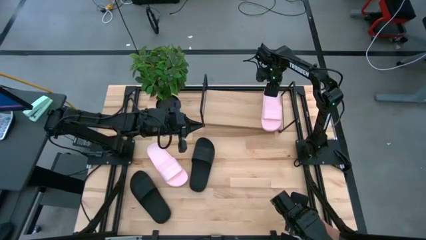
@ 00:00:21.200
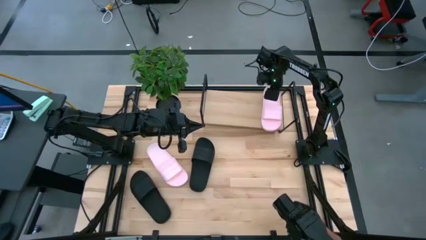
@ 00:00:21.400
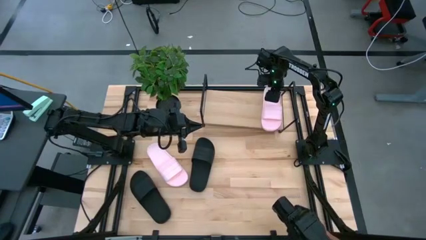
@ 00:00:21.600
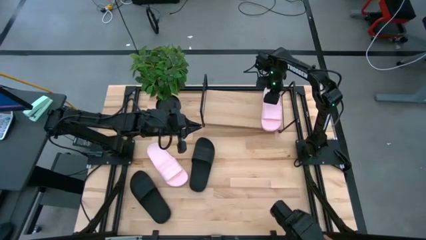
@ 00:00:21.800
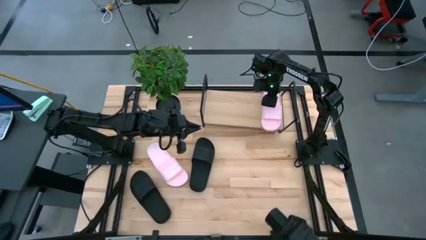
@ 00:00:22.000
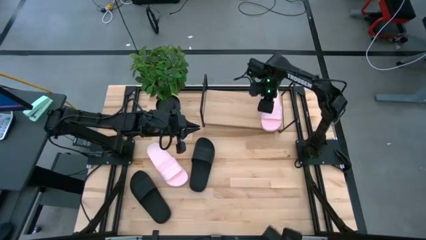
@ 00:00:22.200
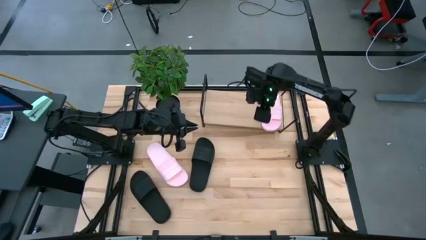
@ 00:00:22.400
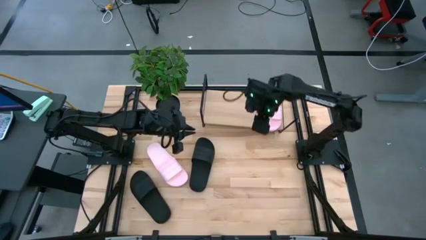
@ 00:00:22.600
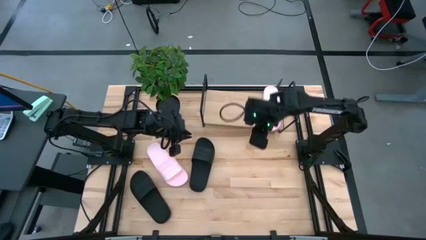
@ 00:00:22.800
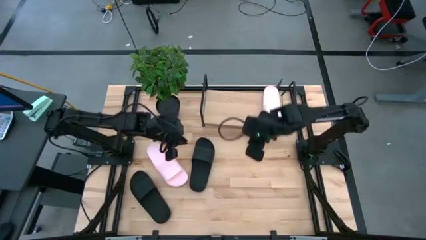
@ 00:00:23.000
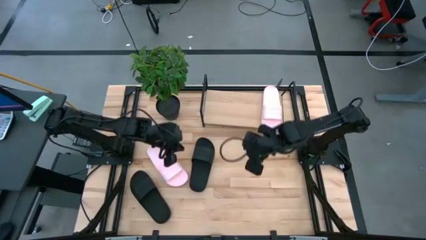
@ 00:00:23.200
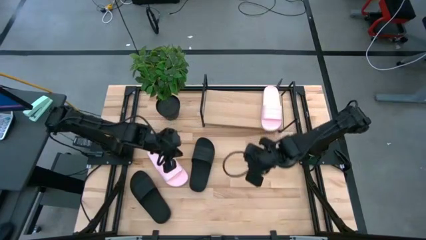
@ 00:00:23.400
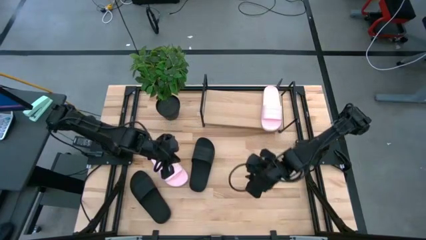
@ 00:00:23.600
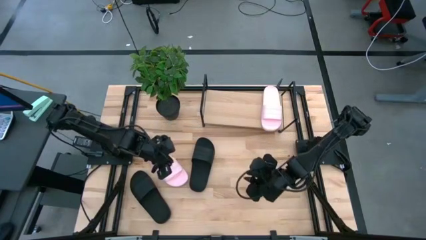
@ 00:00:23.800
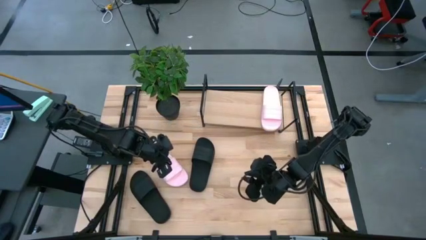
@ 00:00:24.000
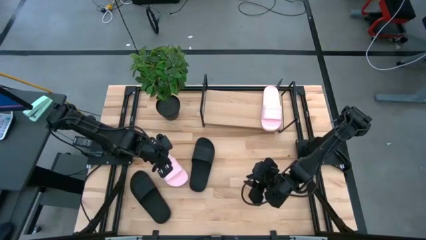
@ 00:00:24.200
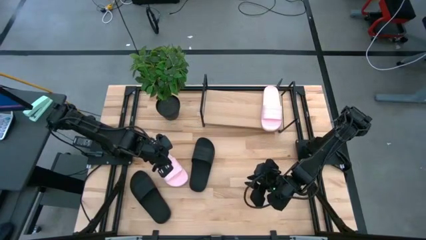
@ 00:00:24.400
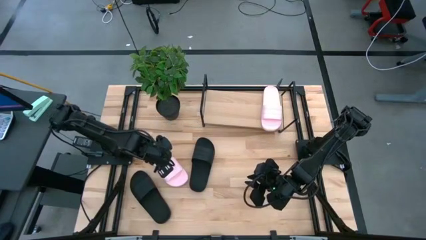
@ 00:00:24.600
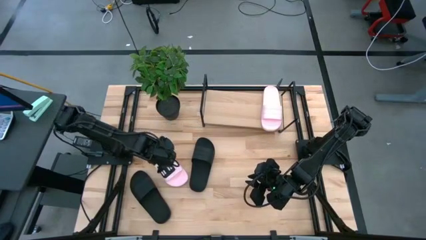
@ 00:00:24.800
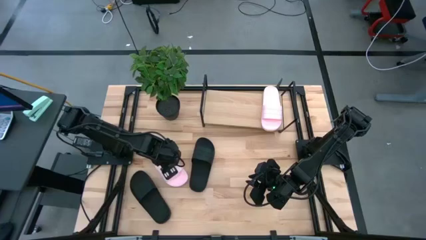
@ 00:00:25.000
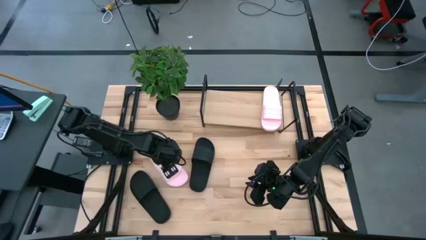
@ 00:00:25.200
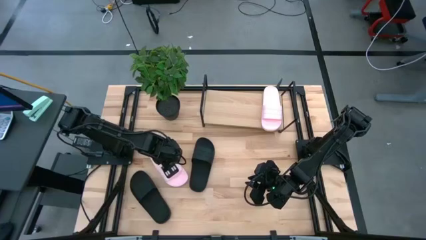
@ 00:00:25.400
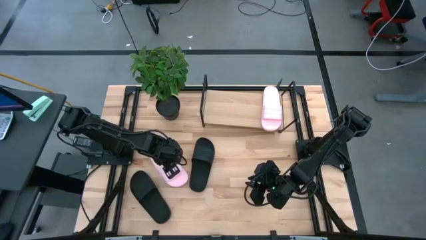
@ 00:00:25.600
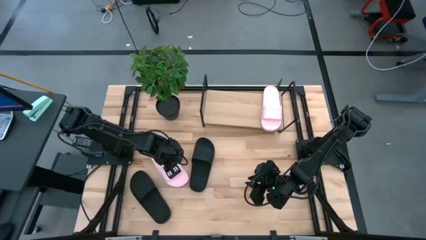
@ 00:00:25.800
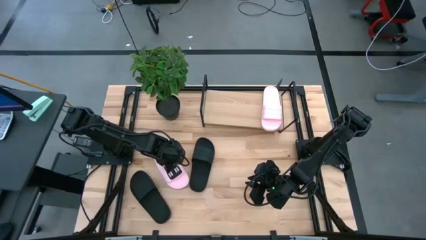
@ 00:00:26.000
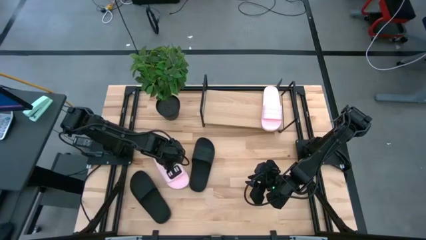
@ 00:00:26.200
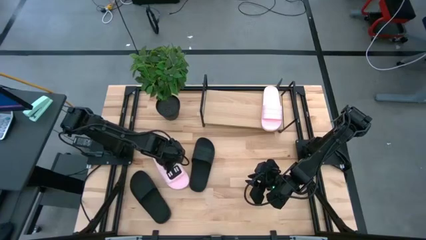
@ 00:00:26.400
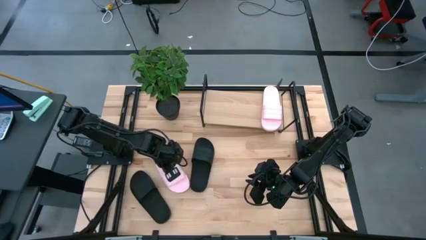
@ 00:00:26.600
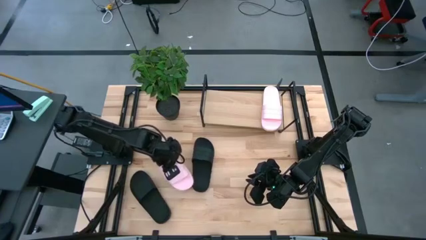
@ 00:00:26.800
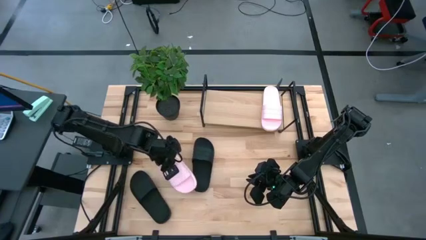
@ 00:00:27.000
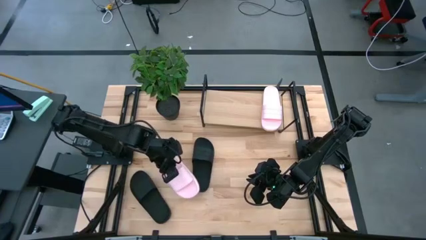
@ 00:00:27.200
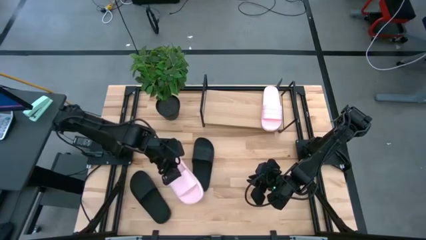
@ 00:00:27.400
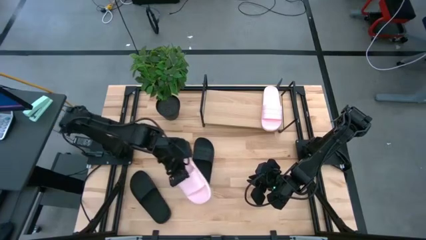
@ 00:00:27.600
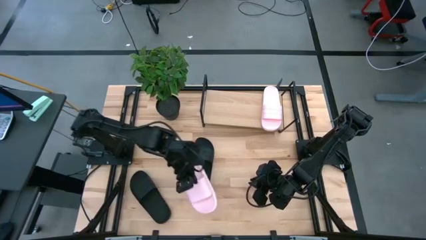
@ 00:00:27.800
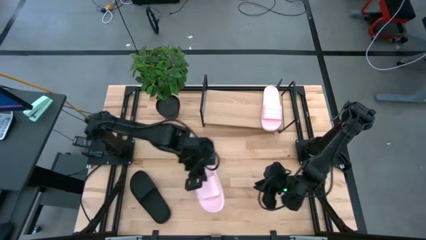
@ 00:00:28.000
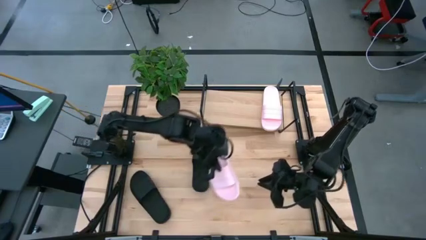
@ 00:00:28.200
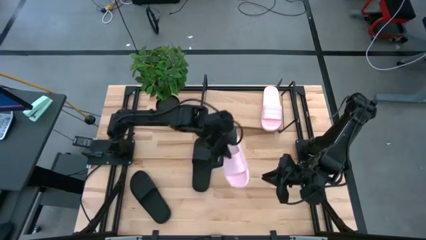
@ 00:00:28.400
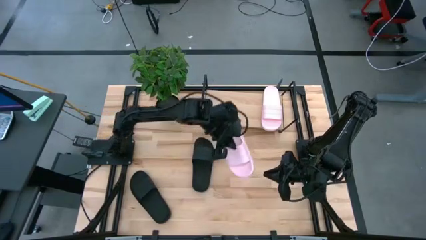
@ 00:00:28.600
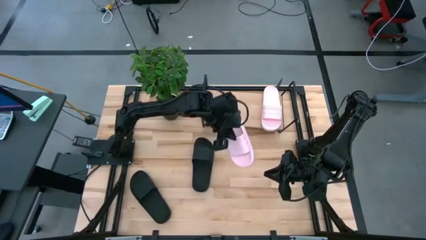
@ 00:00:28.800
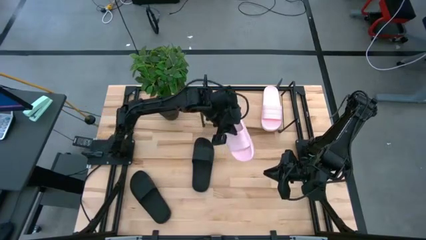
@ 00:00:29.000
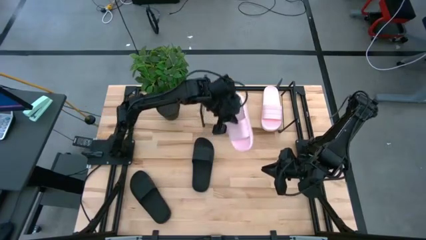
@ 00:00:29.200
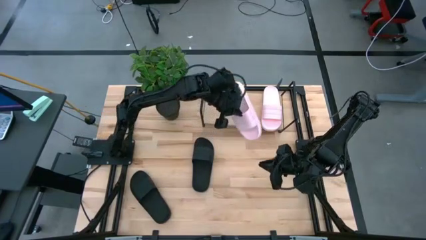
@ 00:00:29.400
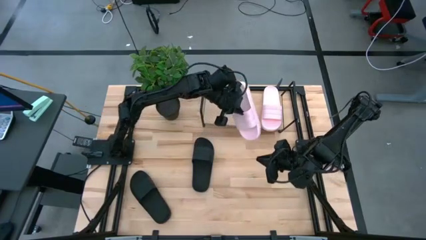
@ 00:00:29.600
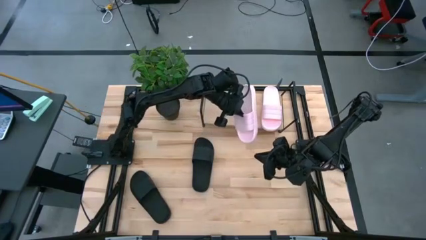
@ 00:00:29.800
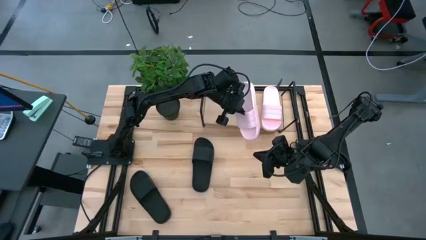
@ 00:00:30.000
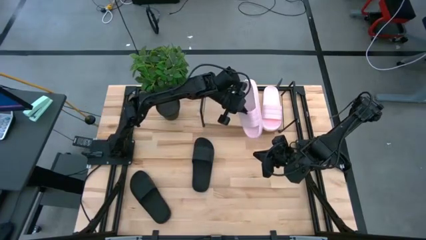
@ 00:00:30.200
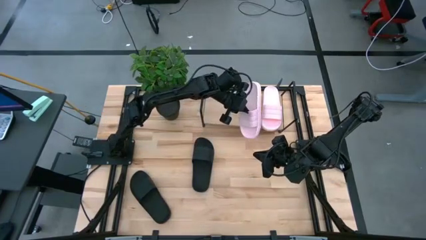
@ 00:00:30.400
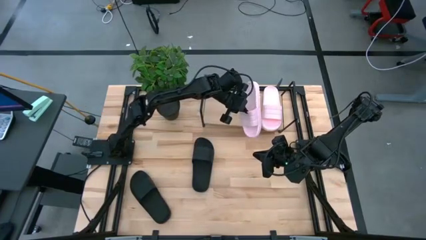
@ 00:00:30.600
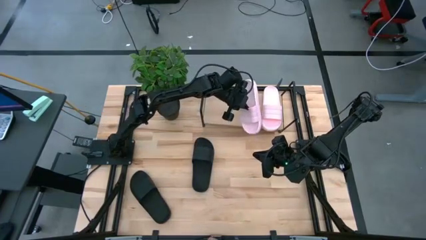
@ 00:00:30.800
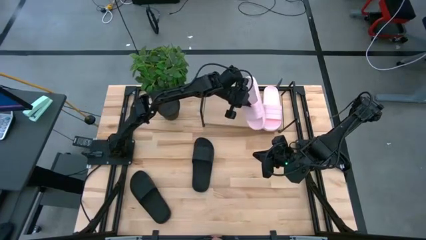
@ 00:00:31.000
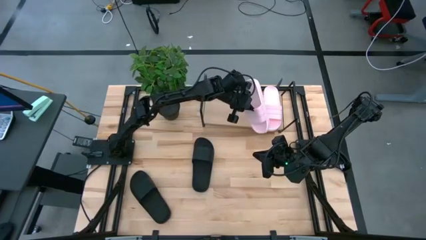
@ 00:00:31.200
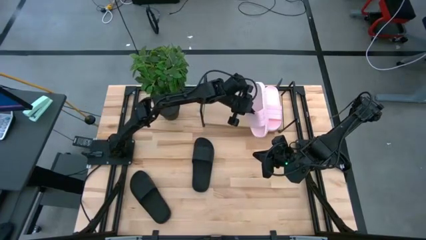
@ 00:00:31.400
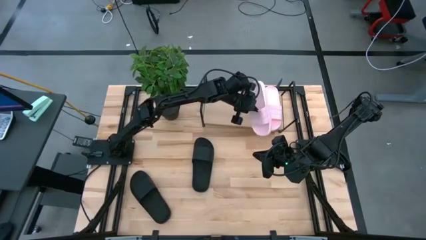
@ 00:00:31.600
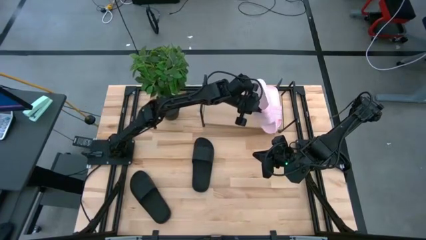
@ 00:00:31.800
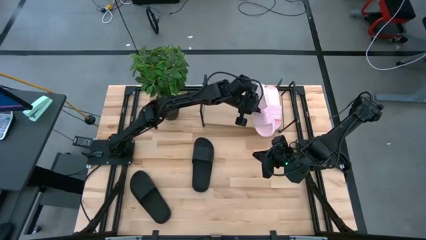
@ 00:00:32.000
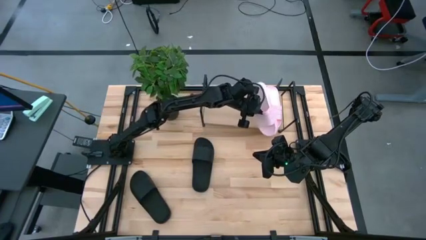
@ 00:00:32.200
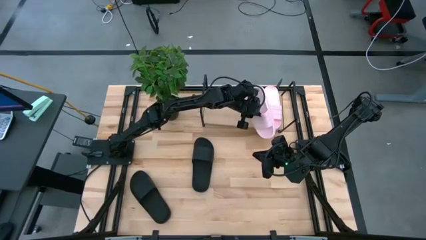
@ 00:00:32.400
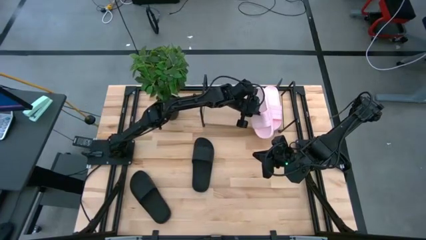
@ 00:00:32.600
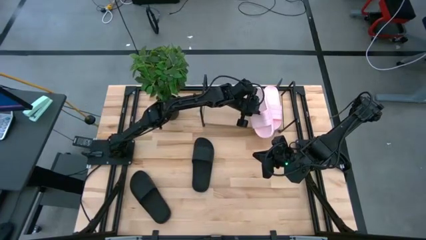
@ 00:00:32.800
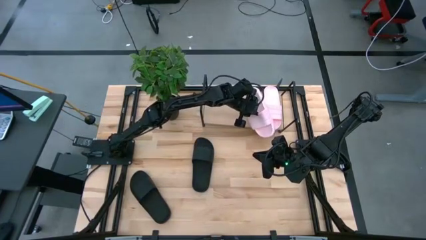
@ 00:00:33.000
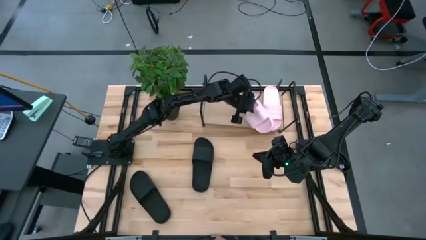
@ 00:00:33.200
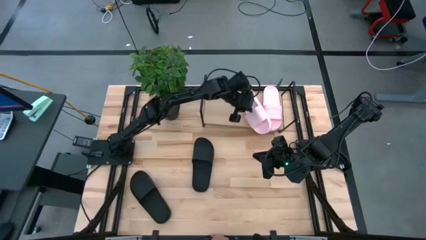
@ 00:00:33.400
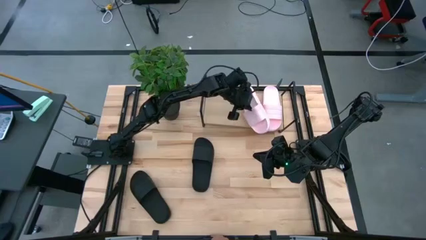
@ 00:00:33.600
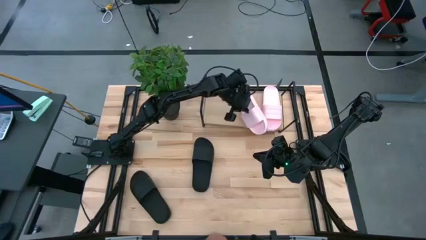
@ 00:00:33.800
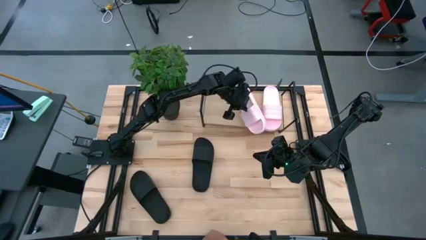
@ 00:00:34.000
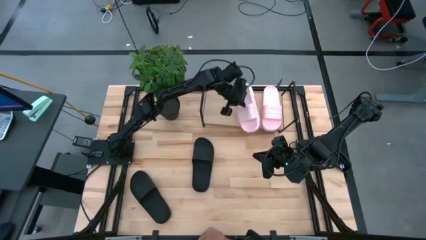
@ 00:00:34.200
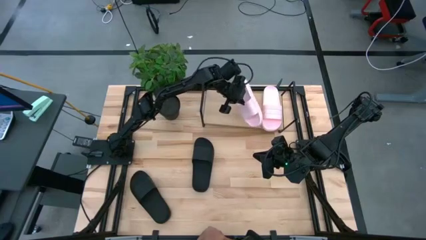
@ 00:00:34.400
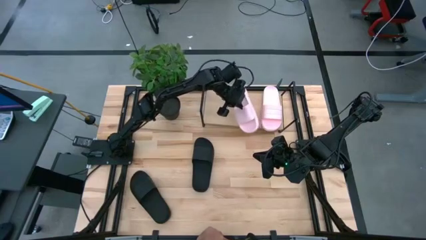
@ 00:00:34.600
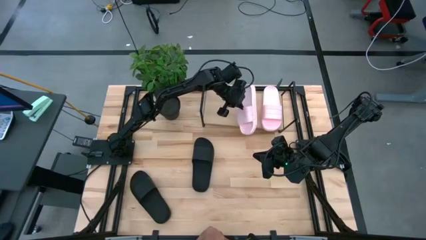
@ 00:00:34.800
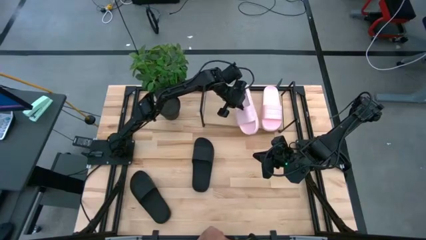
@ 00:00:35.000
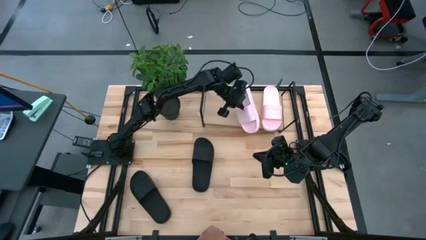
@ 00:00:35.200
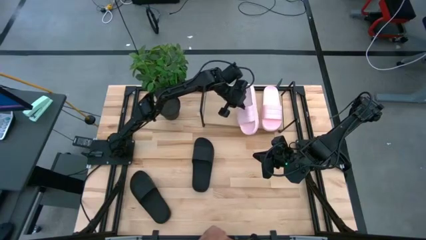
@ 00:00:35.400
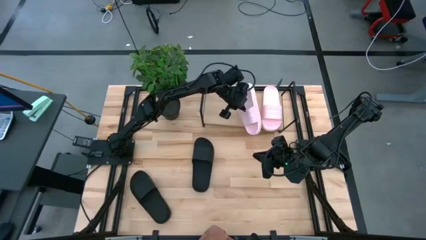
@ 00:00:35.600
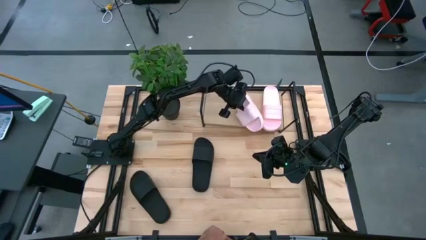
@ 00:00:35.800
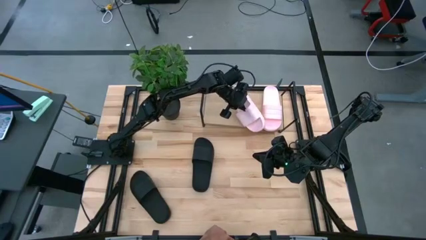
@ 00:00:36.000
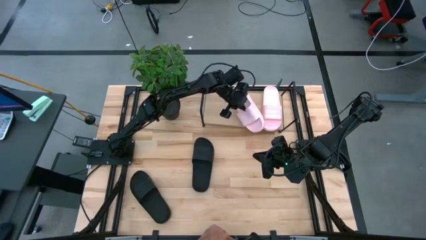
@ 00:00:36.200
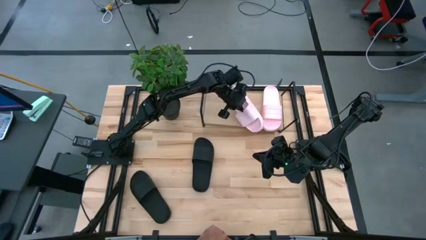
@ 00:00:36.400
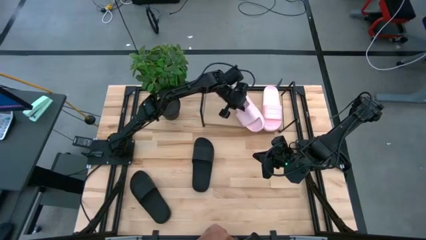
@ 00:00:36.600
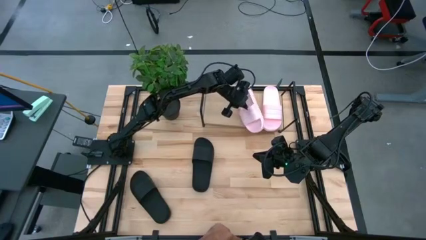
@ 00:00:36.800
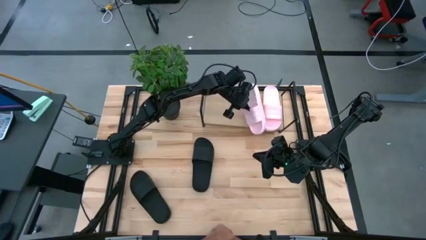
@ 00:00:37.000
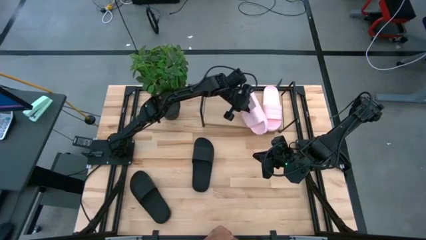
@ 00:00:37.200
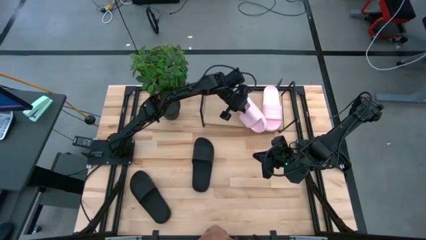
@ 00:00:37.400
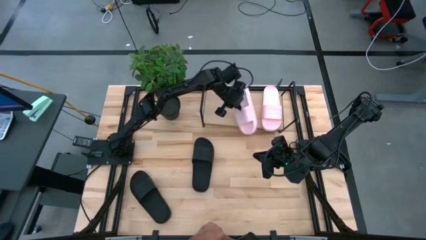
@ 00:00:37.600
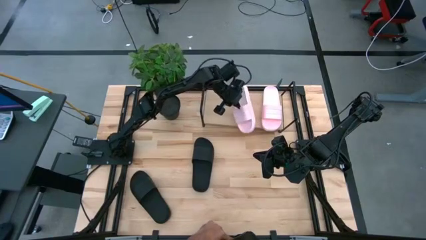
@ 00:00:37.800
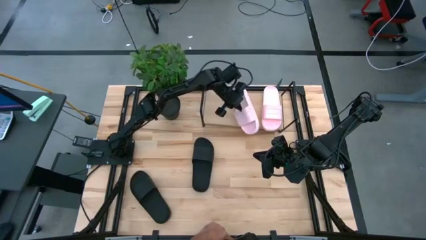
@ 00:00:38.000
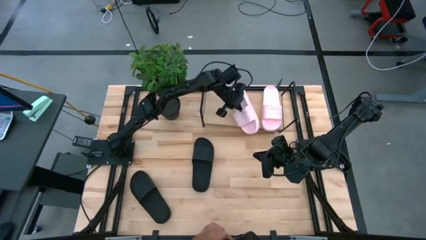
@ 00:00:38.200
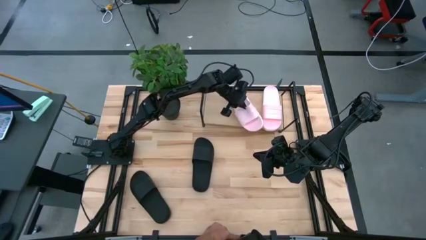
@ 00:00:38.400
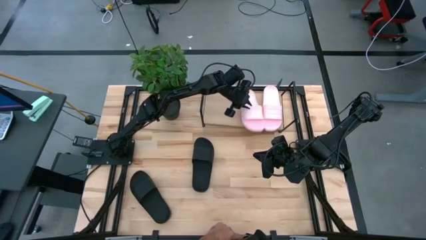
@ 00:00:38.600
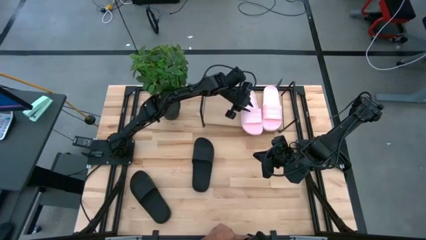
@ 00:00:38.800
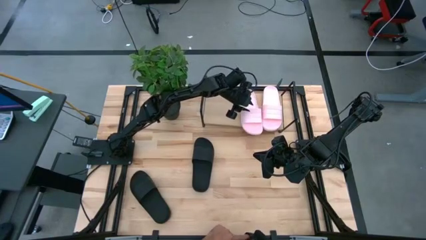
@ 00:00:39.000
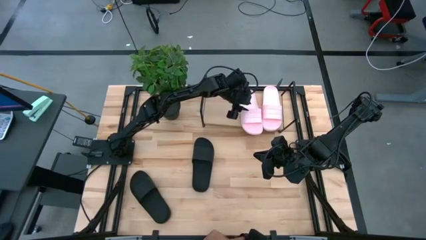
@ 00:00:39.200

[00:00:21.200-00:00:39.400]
Task: Pick and place slides into the shelf
Put the pink slide on the shelf
